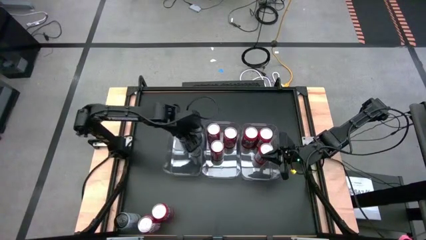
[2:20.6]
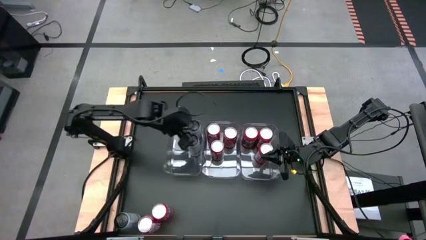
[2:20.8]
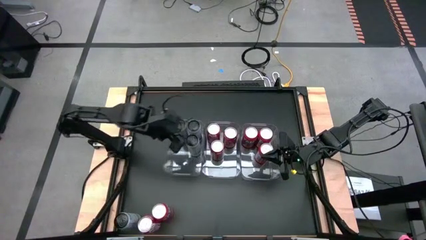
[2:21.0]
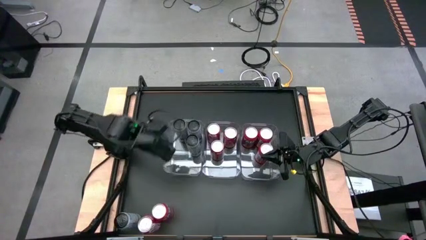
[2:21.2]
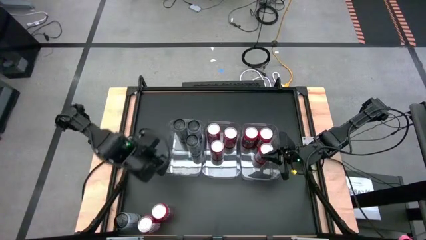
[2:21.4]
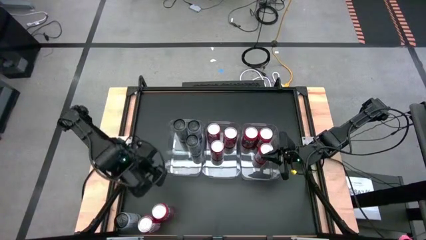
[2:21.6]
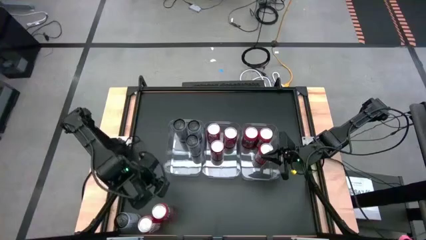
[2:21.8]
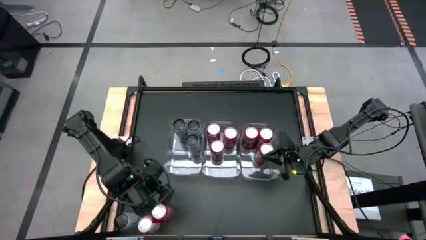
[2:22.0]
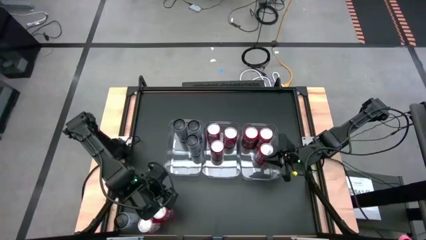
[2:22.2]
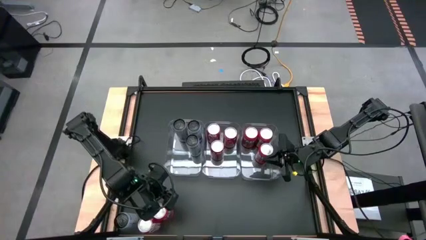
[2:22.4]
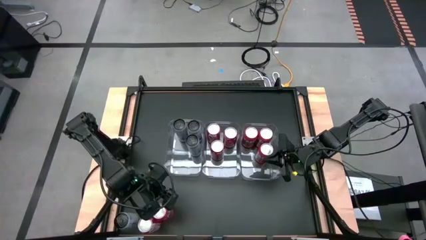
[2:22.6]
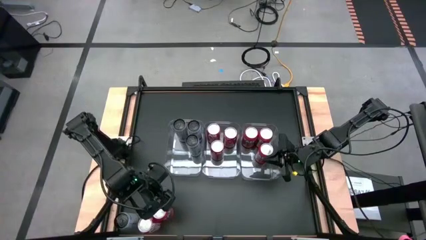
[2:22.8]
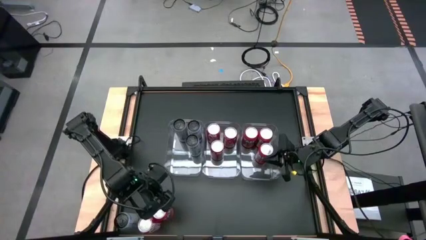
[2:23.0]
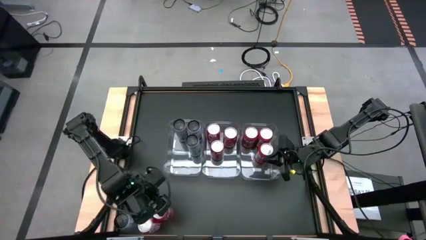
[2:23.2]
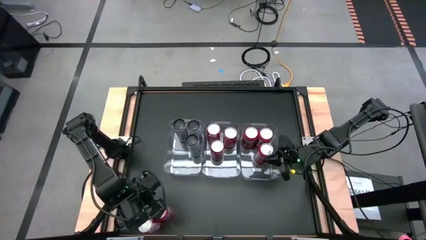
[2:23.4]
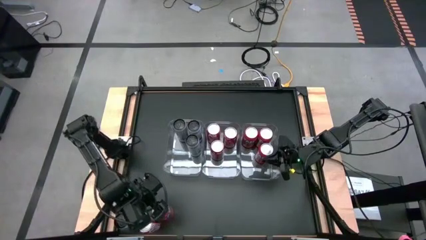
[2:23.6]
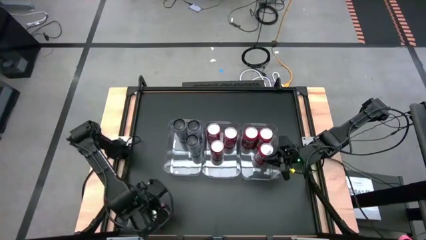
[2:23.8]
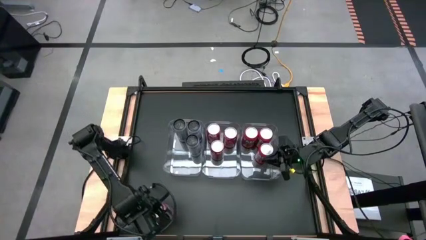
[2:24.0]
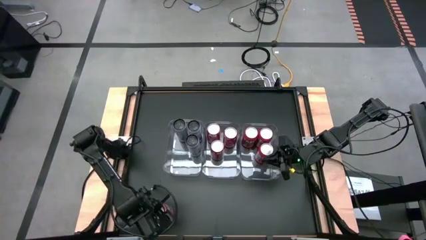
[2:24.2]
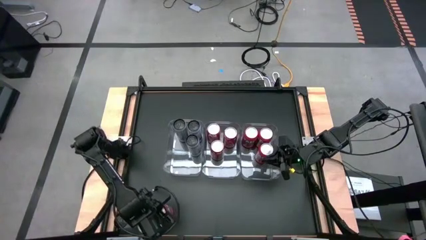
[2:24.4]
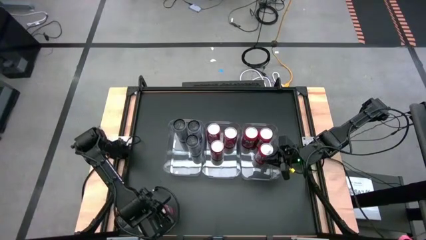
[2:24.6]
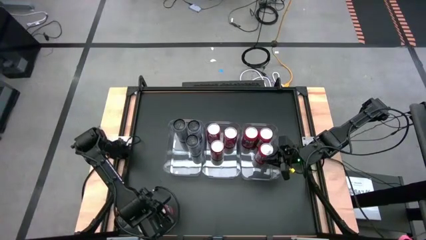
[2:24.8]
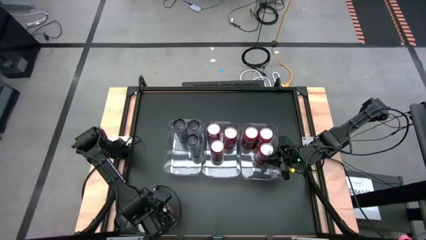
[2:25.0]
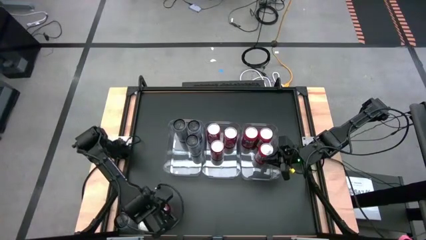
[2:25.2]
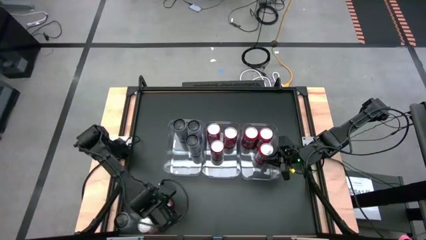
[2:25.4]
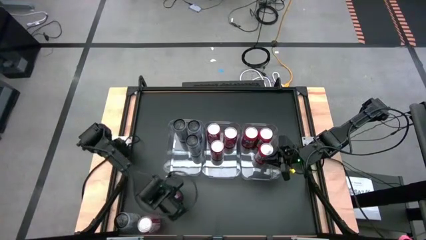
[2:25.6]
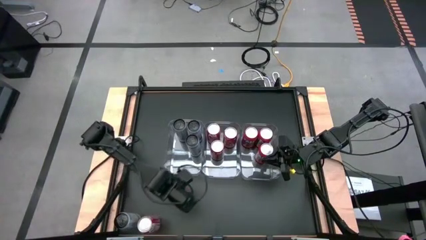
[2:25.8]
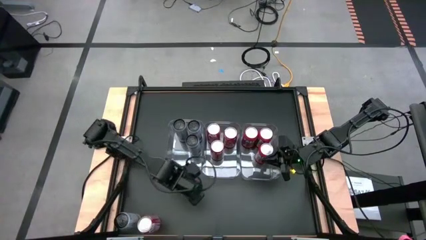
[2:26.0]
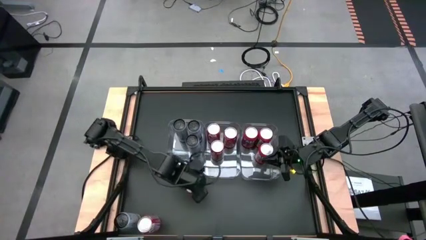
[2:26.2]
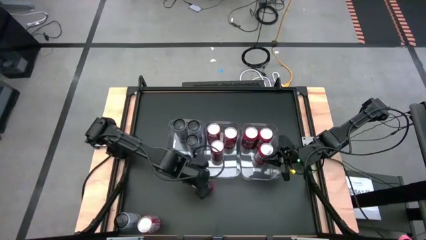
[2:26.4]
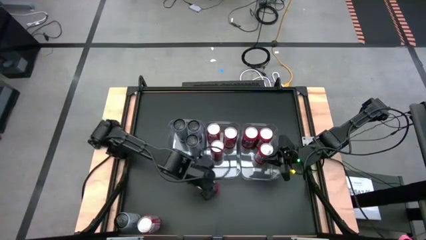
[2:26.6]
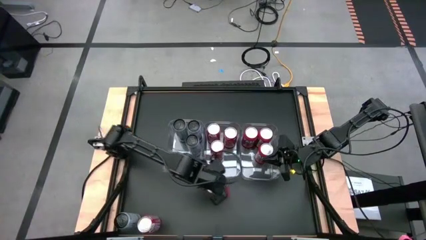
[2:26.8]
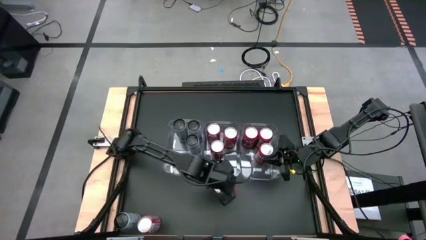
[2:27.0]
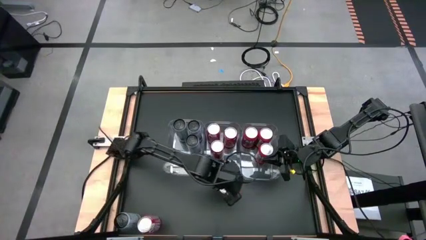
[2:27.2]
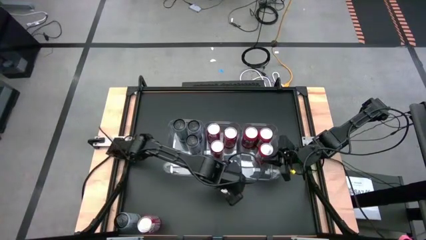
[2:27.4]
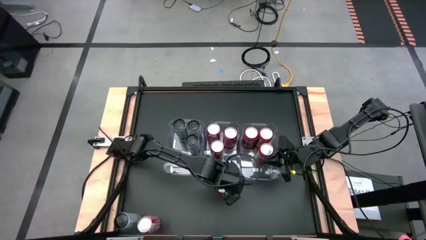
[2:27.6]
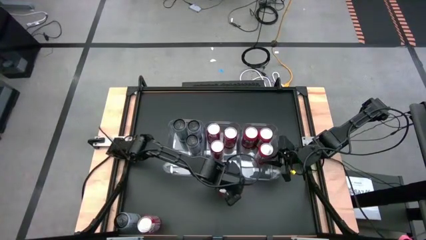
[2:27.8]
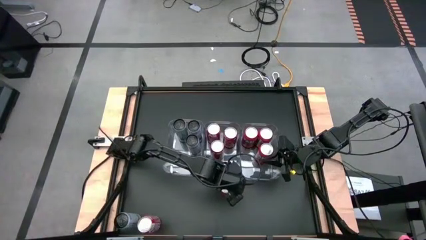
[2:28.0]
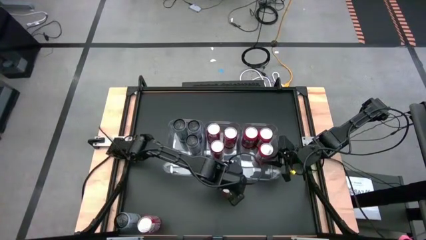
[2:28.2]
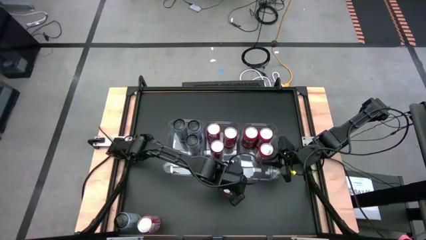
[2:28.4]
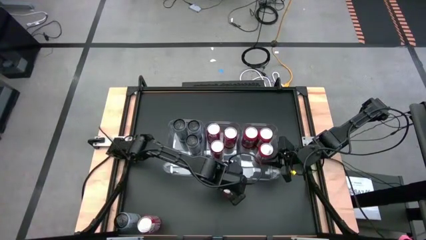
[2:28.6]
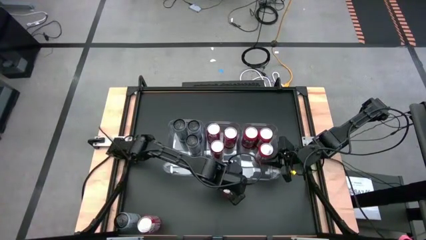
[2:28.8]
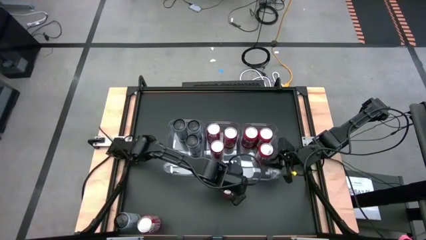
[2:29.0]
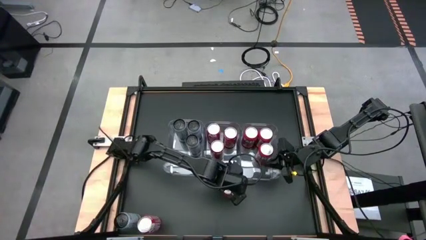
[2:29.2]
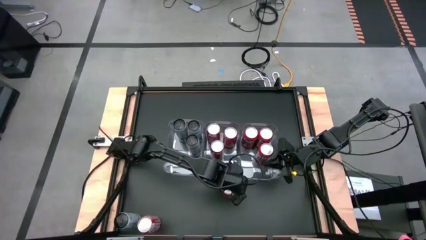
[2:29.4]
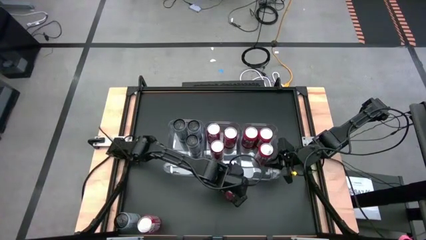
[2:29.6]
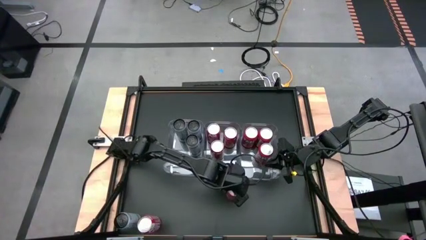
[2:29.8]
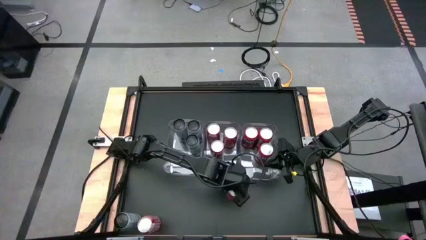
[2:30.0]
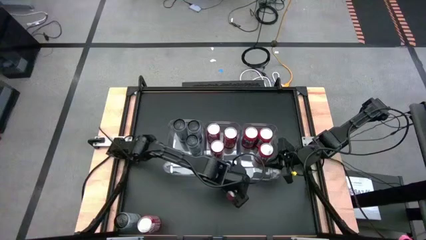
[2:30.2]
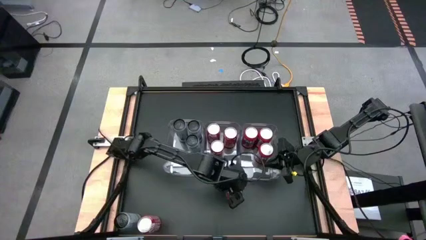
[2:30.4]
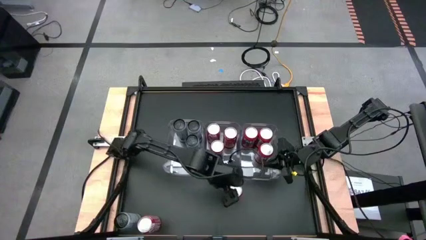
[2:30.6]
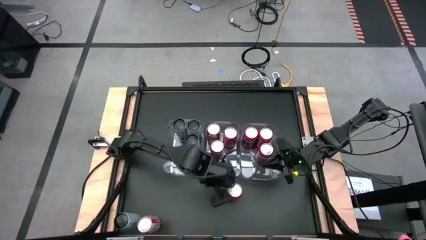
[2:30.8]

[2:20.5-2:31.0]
Task: Sort soda cans
Put the red soda can into the right transparent bin

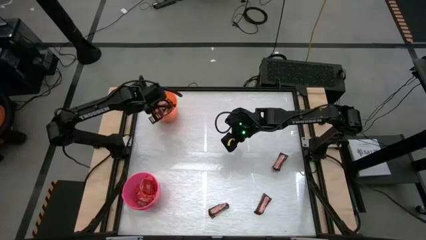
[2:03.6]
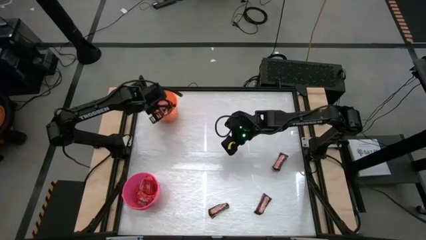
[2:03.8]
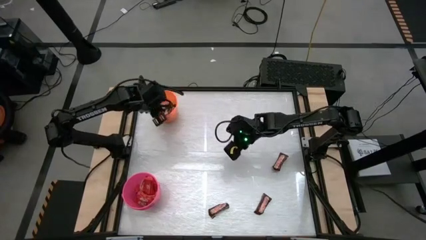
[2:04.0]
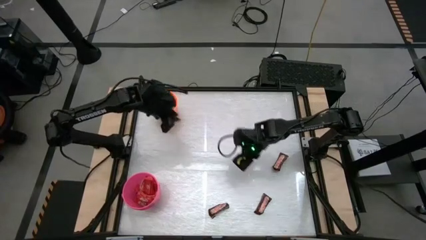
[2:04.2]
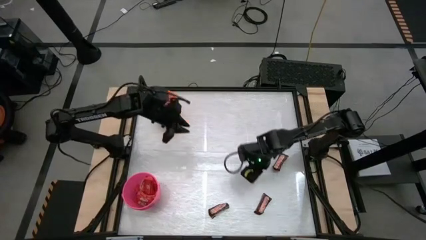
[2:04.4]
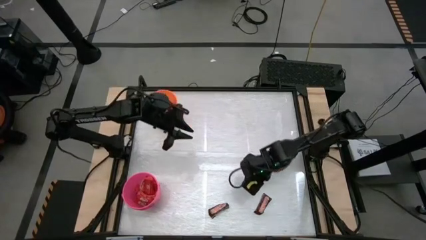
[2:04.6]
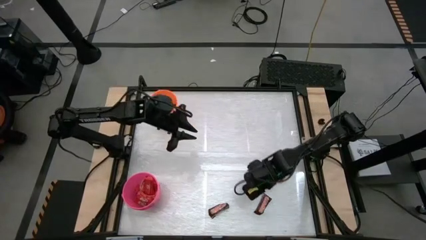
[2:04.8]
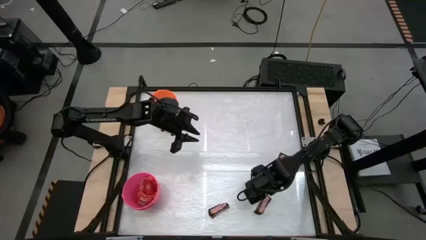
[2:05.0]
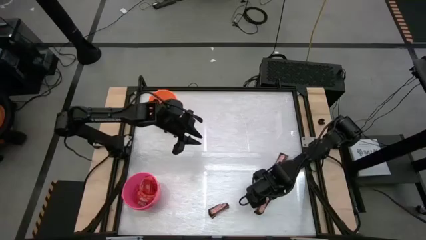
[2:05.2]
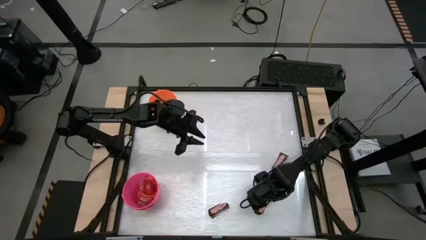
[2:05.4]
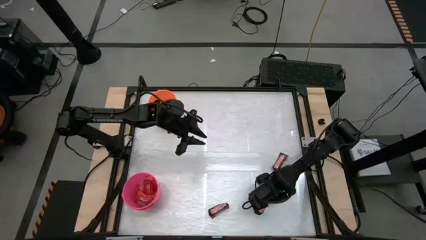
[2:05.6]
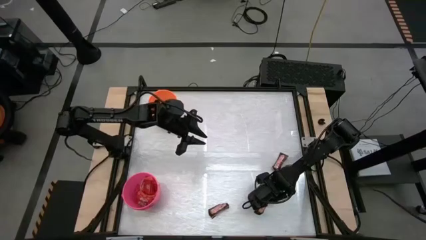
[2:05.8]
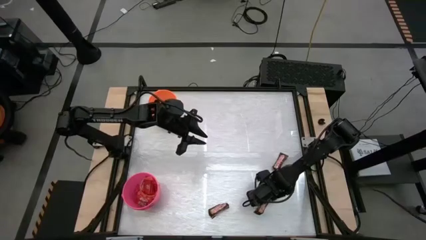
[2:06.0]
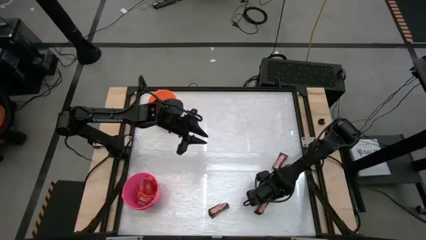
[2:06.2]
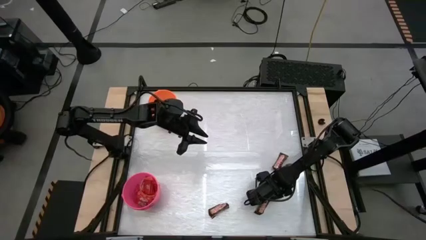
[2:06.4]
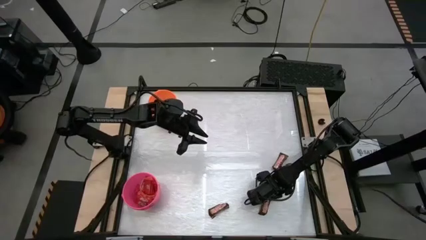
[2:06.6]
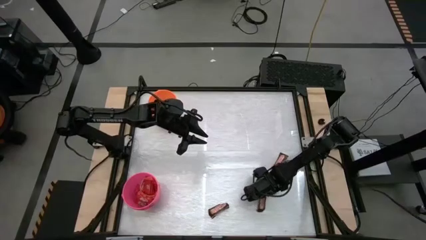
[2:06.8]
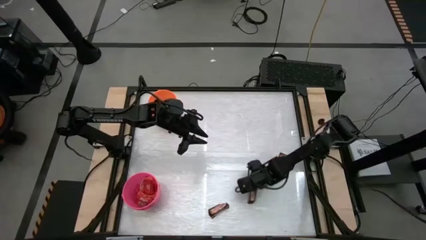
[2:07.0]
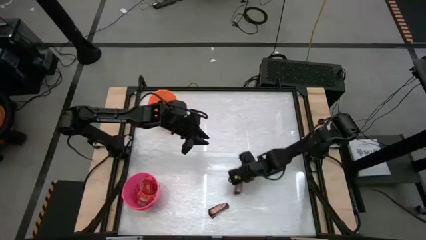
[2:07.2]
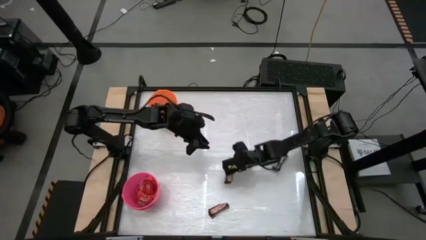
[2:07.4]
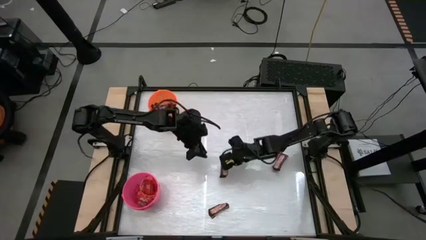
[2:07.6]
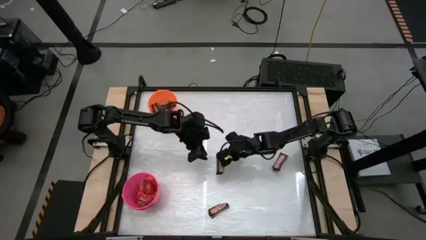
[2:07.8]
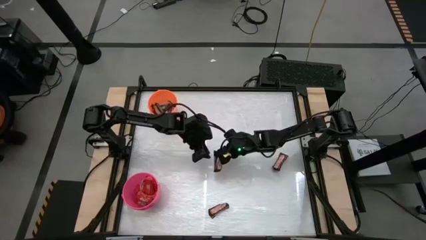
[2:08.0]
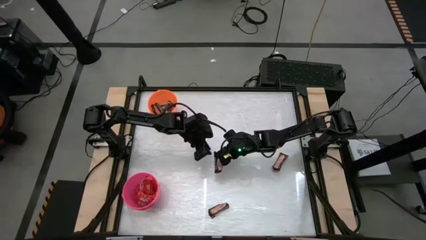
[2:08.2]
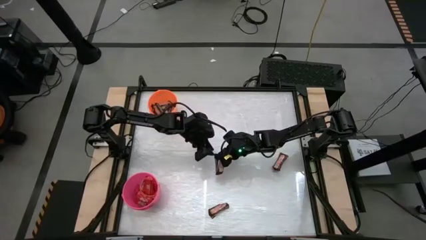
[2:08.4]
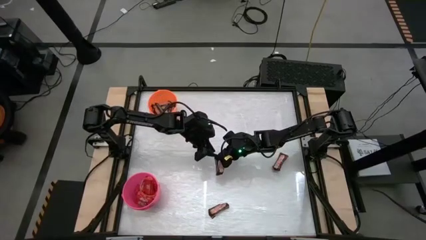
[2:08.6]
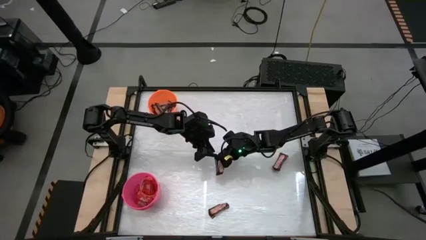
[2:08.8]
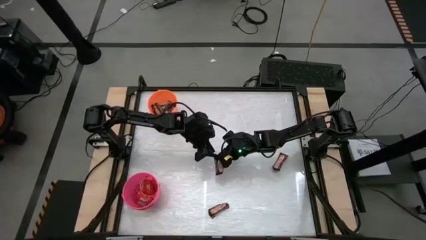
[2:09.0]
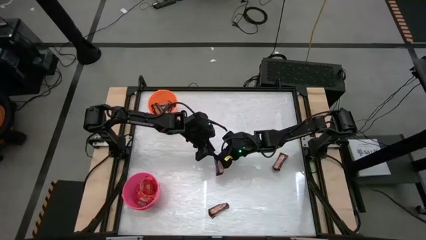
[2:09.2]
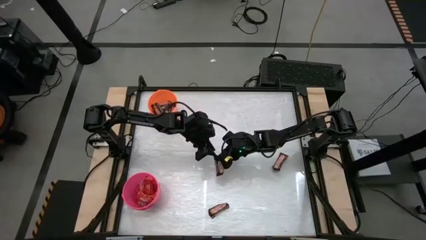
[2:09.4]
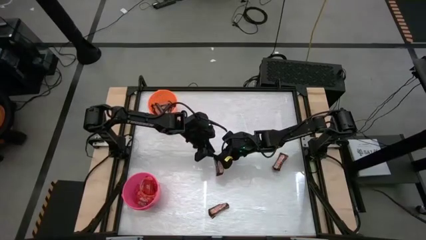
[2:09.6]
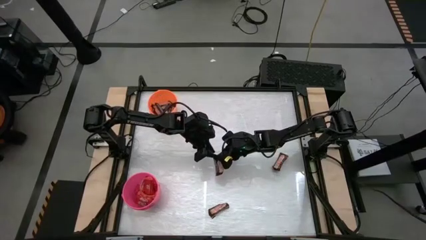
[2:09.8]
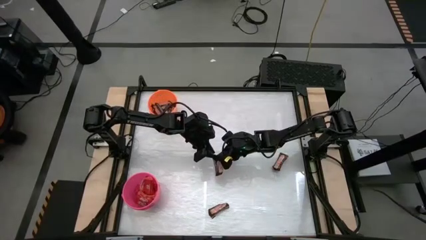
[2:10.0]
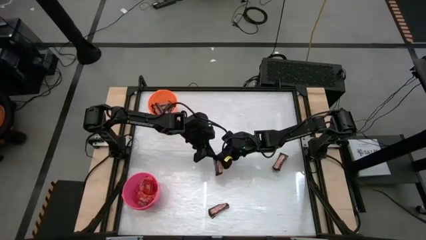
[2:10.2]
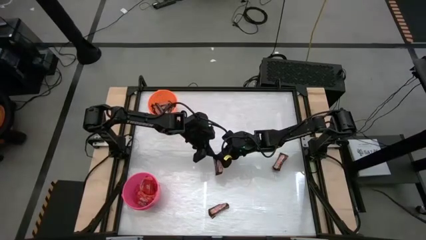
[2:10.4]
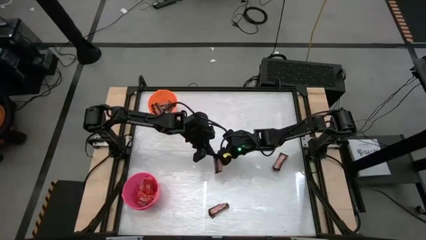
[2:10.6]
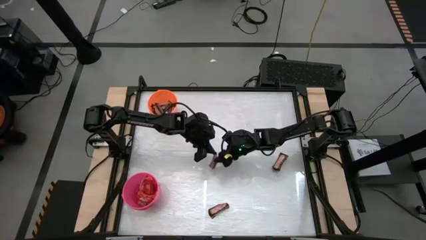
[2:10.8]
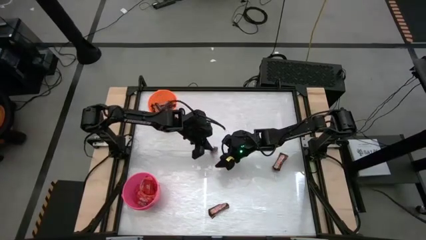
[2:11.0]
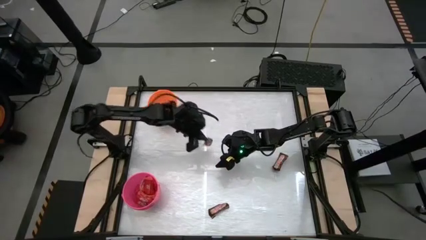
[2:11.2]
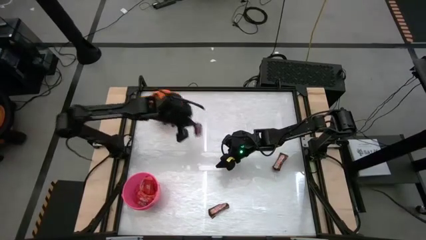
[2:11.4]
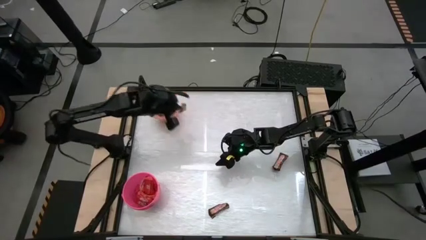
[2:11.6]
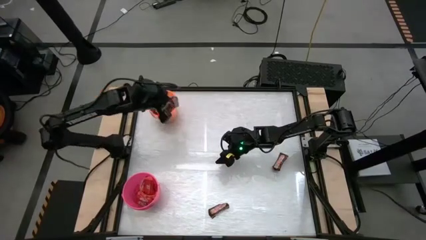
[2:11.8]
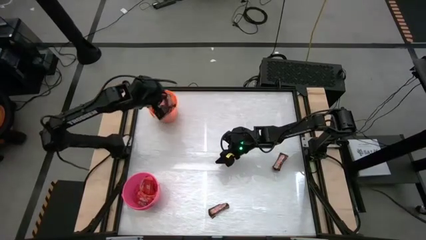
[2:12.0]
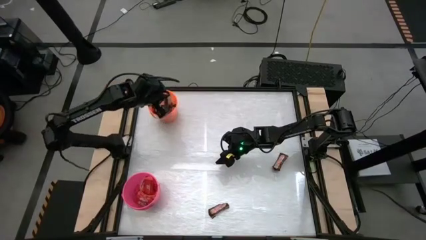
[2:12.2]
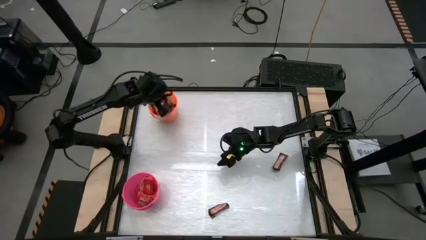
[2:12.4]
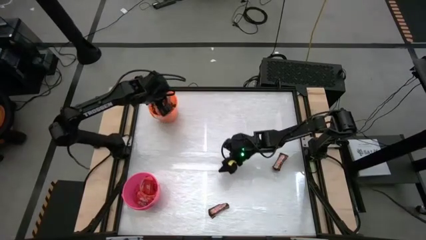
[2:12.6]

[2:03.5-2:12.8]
Task: Sort candy by brand, put in halloween buckets
Put the brown chocolate bar into the orange bucket
